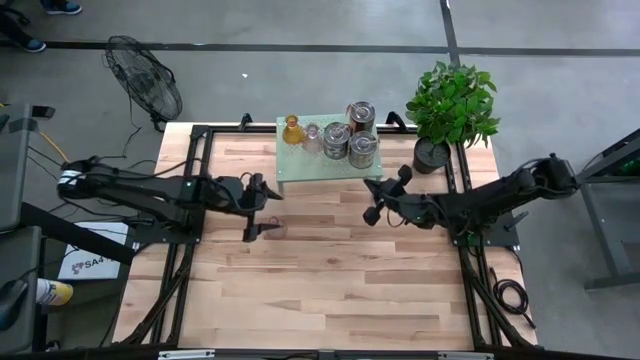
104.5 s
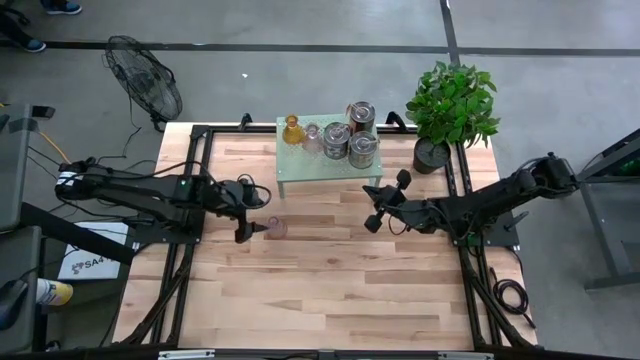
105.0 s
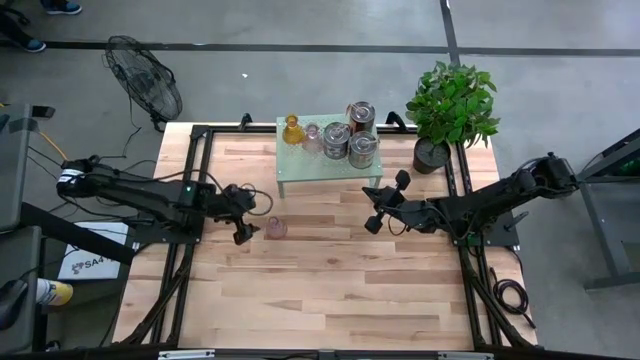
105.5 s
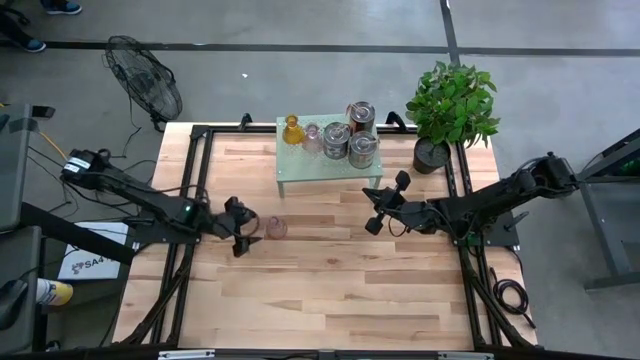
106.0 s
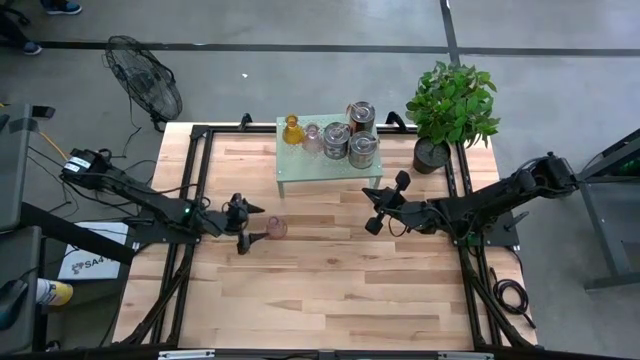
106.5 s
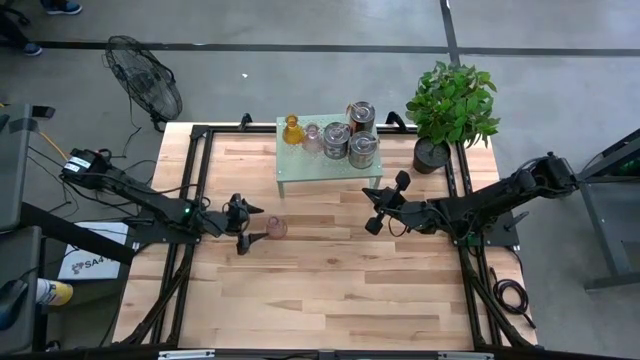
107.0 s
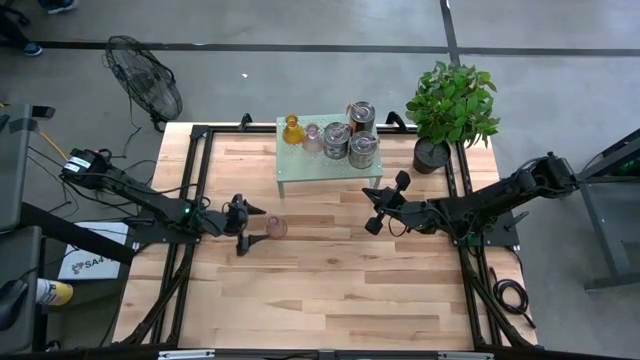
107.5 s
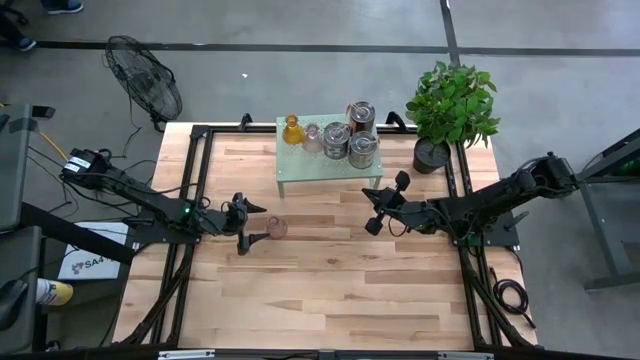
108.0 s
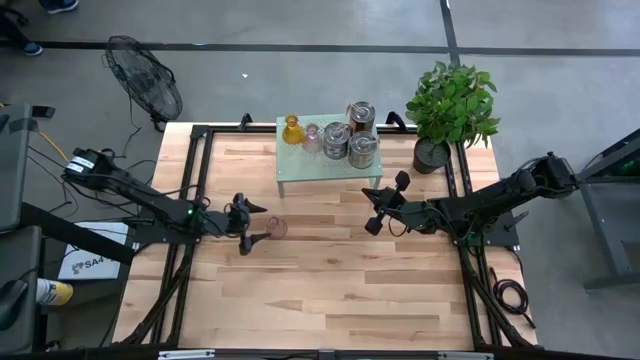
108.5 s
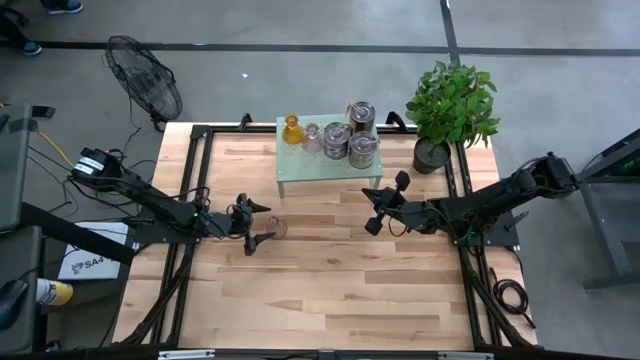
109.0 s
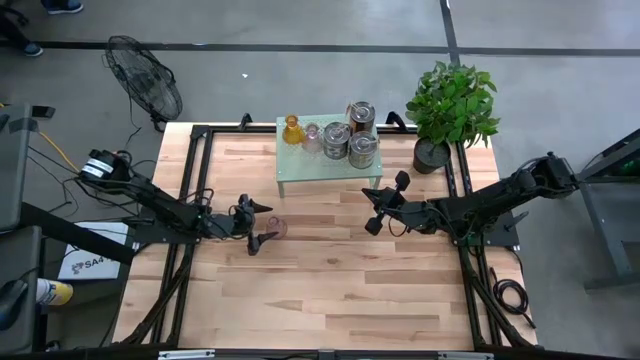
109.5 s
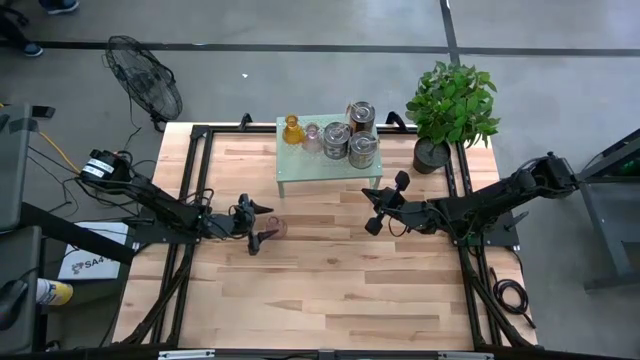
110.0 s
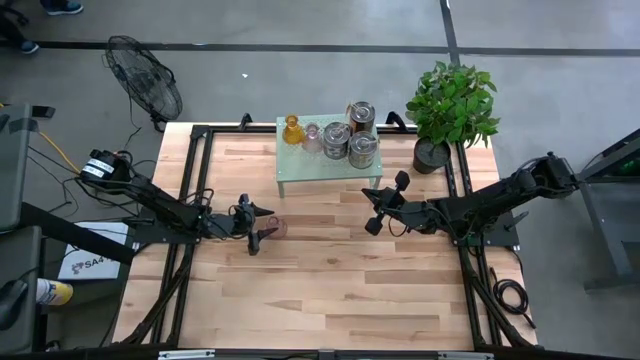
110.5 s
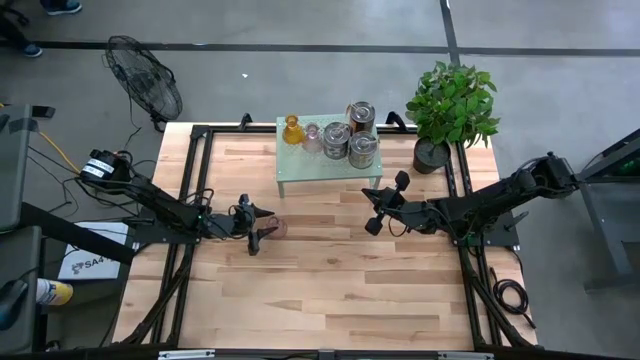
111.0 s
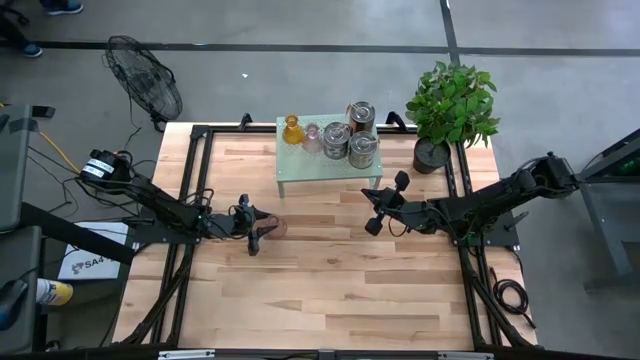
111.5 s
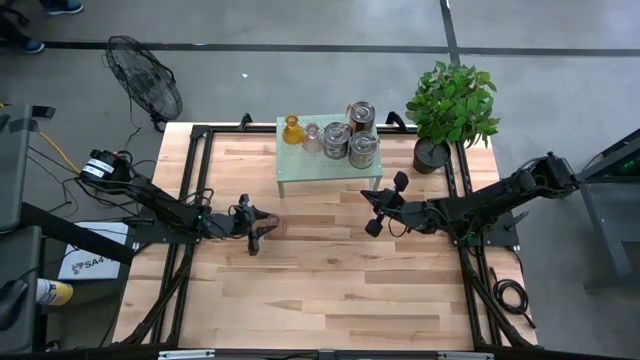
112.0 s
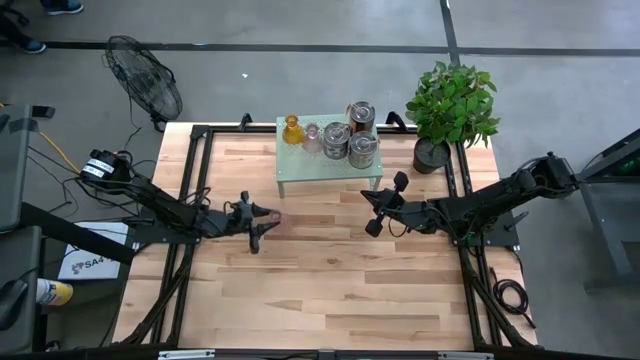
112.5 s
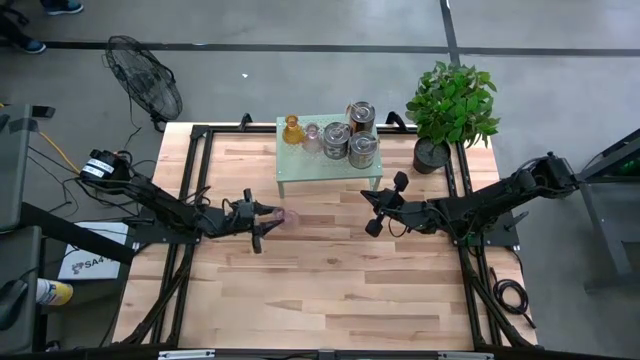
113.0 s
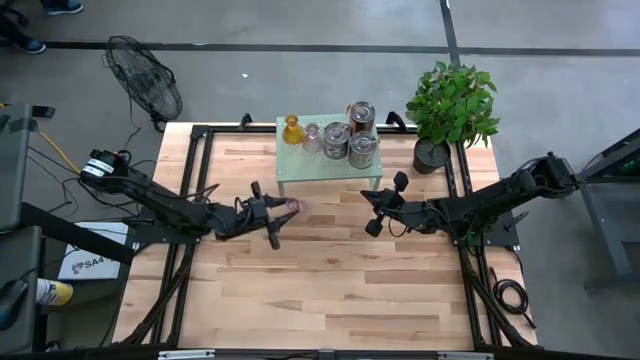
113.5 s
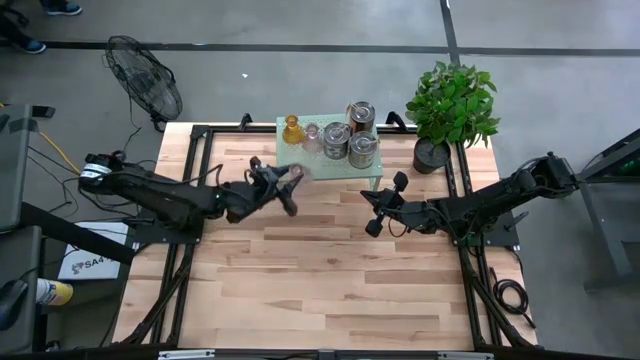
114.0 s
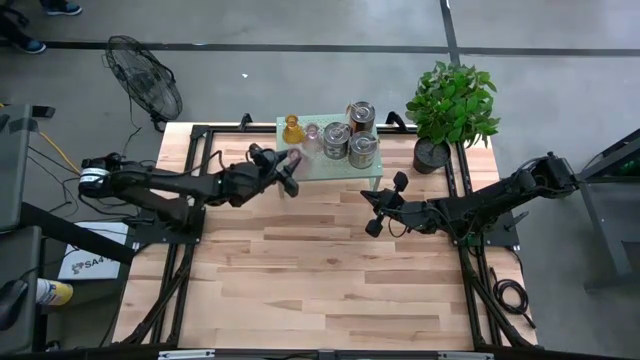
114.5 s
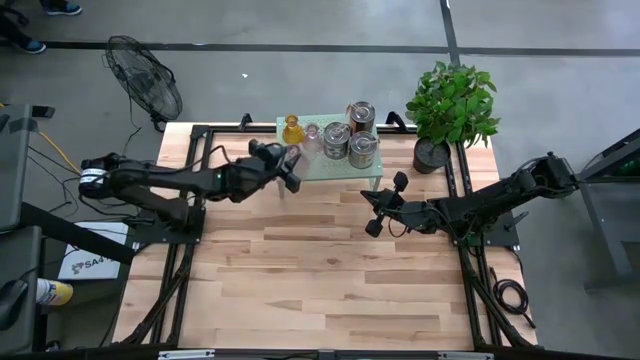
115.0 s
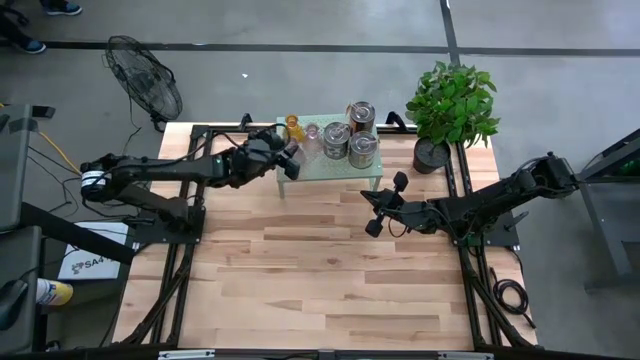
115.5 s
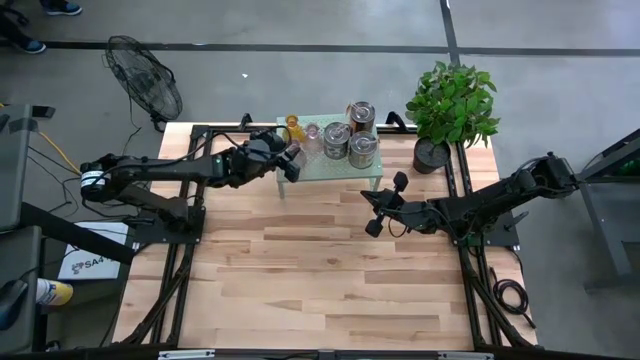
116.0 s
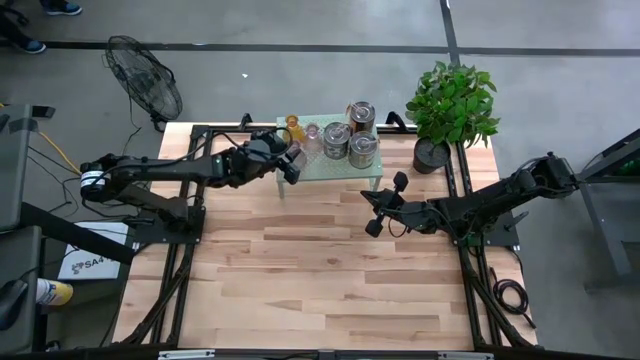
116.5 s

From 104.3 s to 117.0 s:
Task: Pick & Place candle stick holders
Put the purple candle holder on the shelf

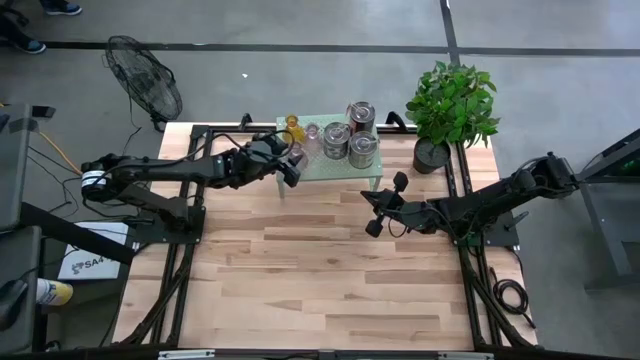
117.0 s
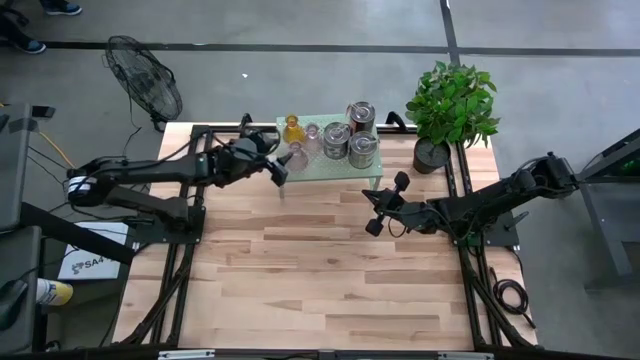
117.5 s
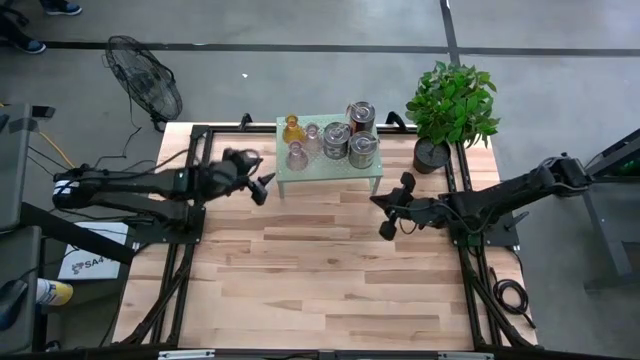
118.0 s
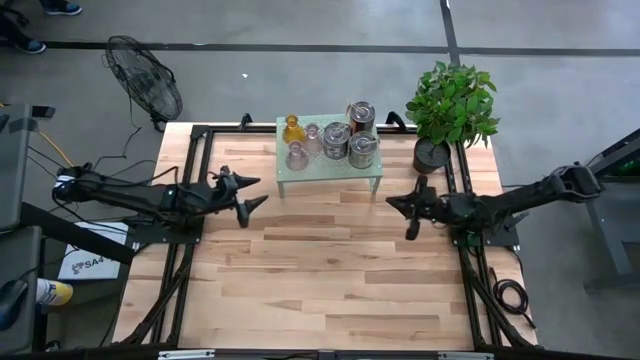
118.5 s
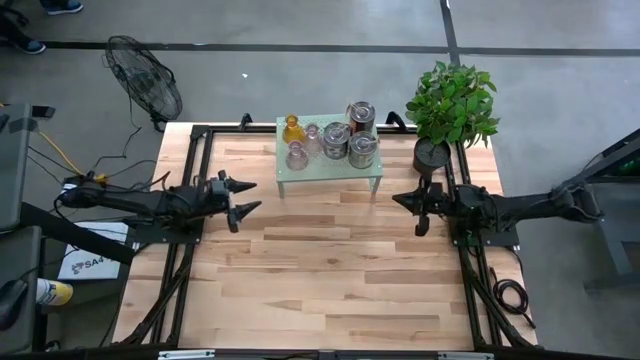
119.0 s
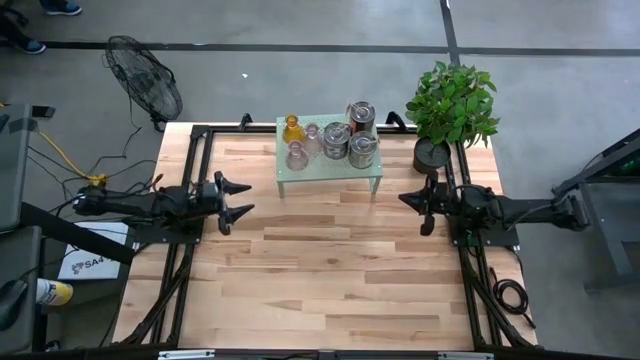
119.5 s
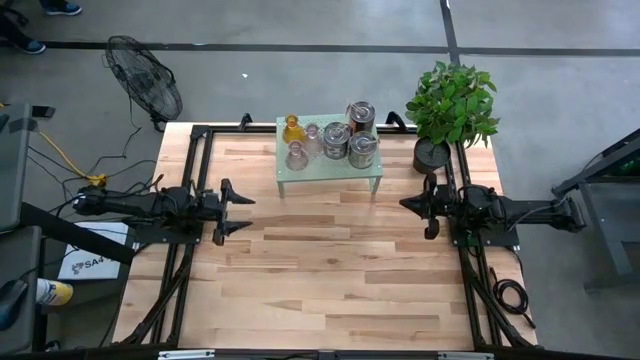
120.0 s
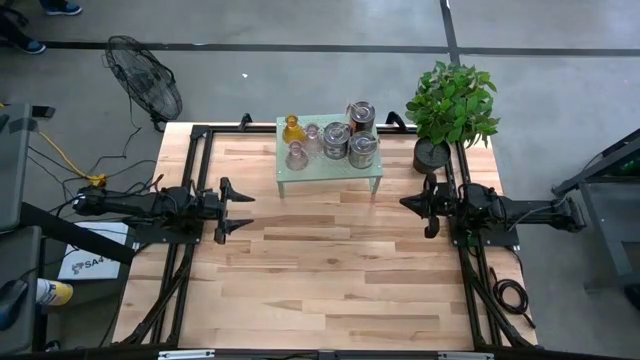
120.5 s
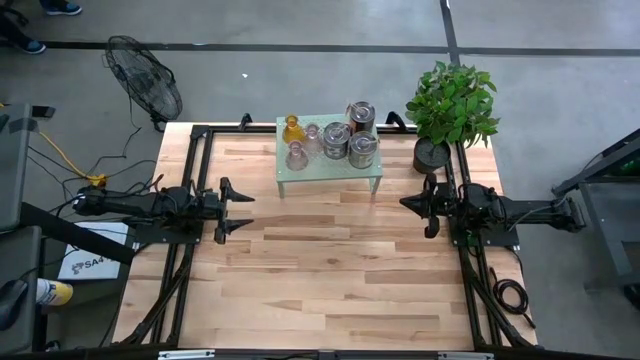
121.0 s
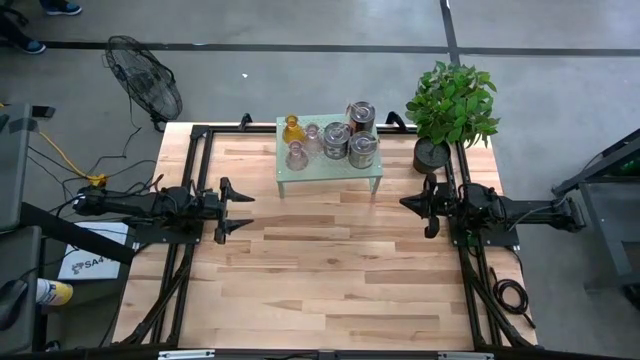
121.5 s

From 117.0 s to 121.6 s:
Return to Home Position
